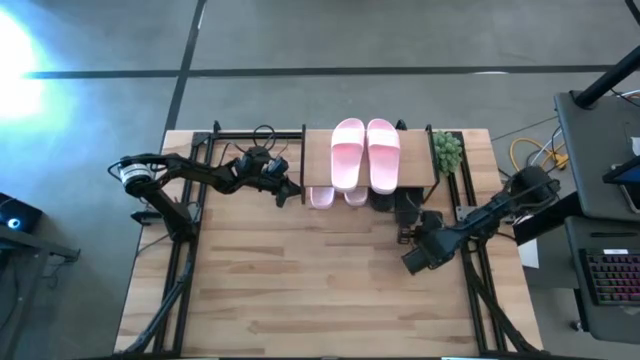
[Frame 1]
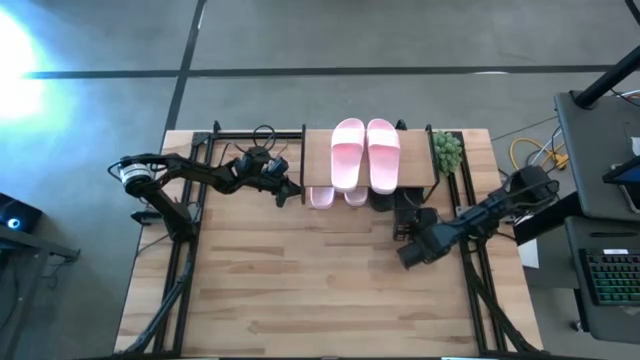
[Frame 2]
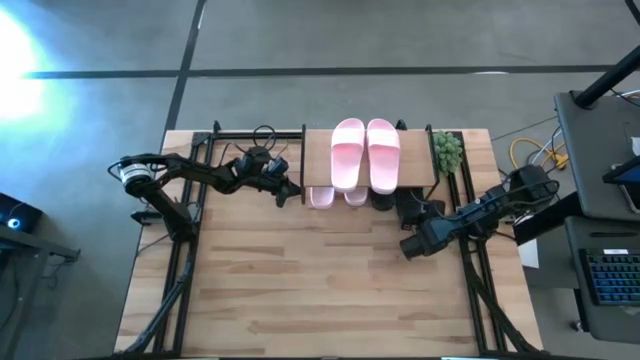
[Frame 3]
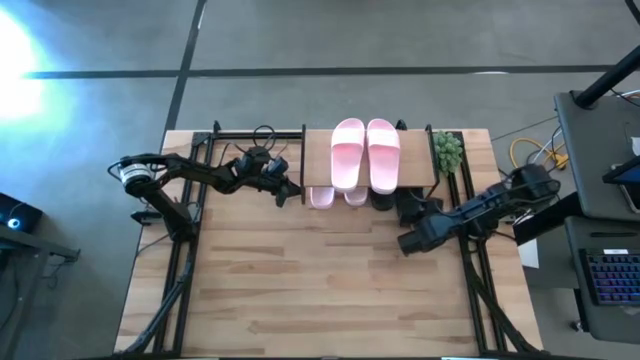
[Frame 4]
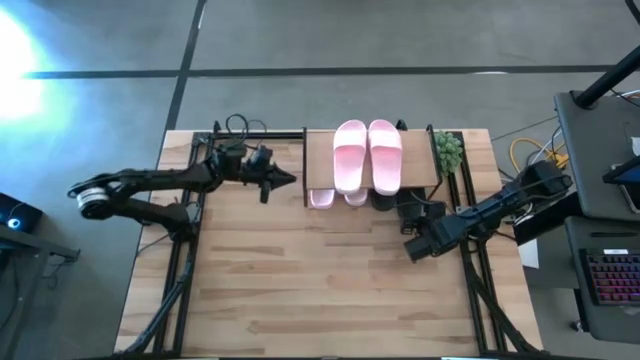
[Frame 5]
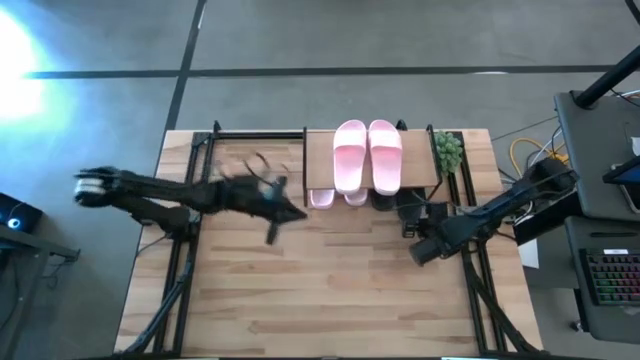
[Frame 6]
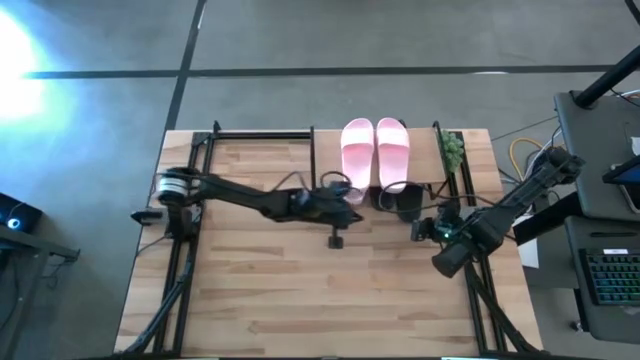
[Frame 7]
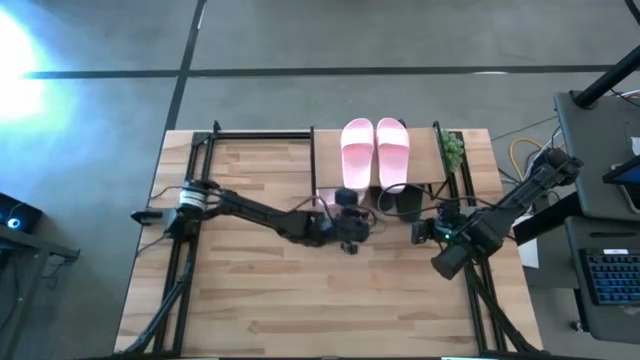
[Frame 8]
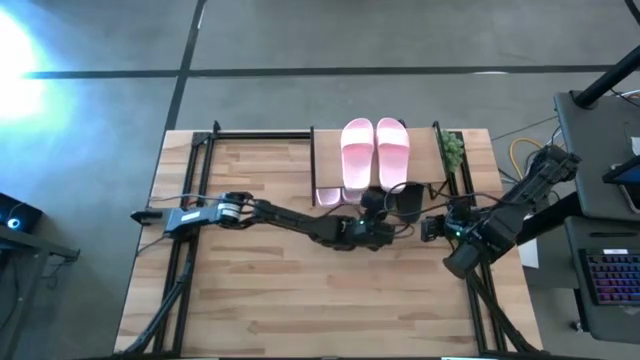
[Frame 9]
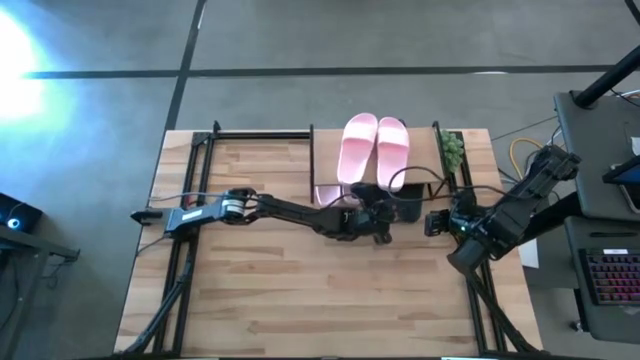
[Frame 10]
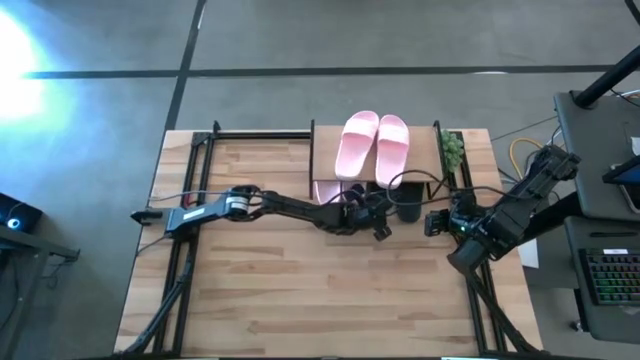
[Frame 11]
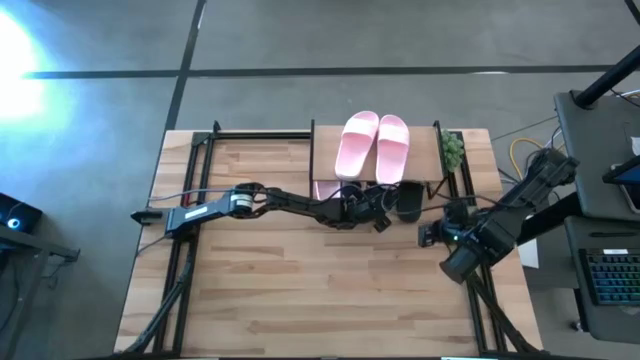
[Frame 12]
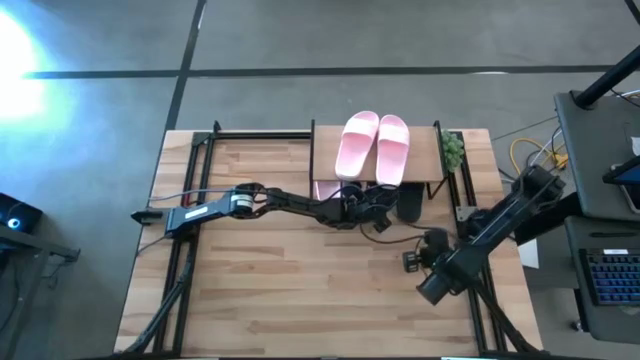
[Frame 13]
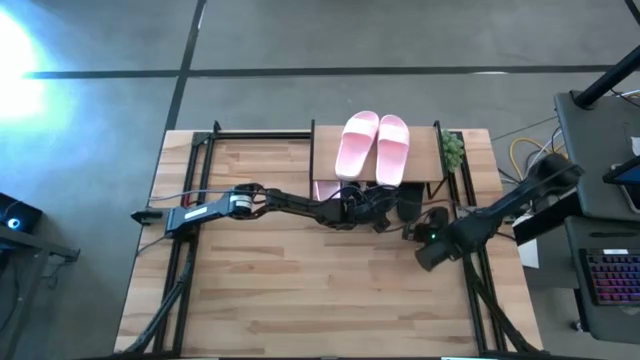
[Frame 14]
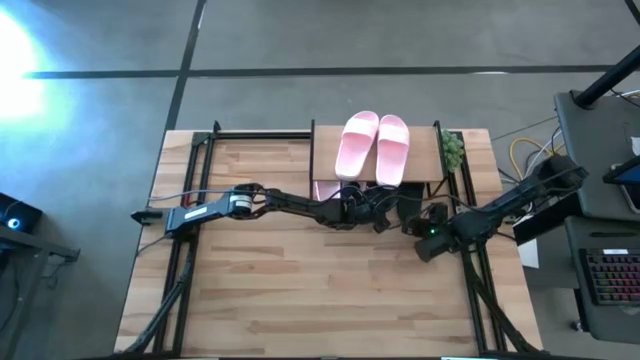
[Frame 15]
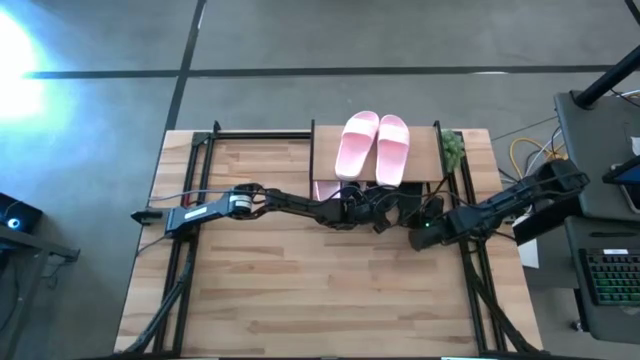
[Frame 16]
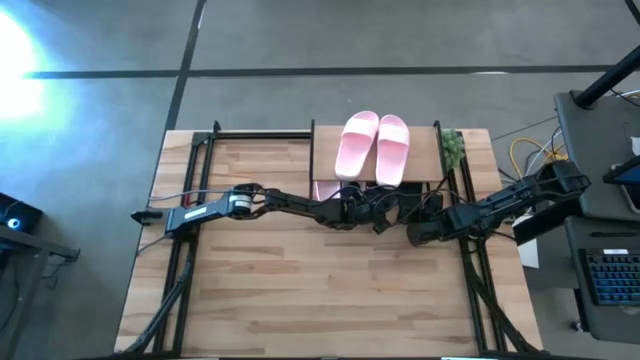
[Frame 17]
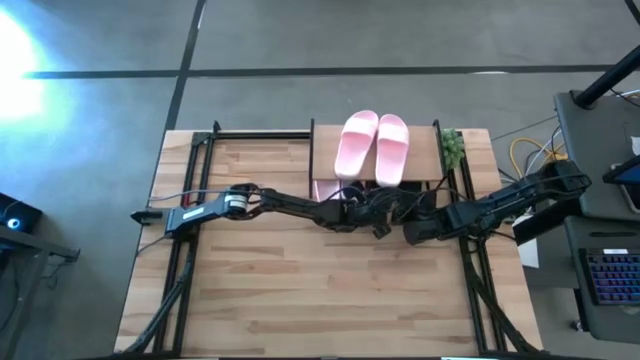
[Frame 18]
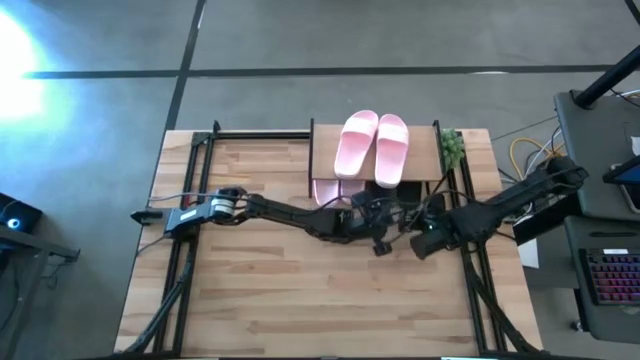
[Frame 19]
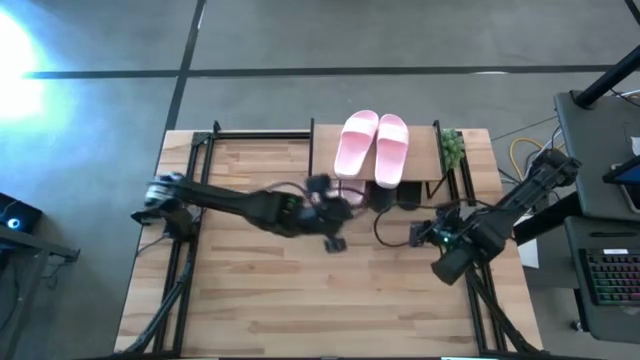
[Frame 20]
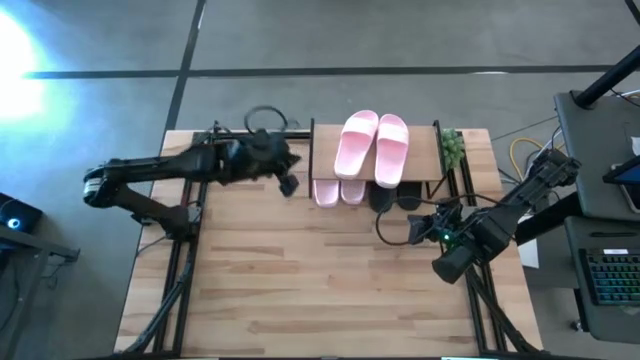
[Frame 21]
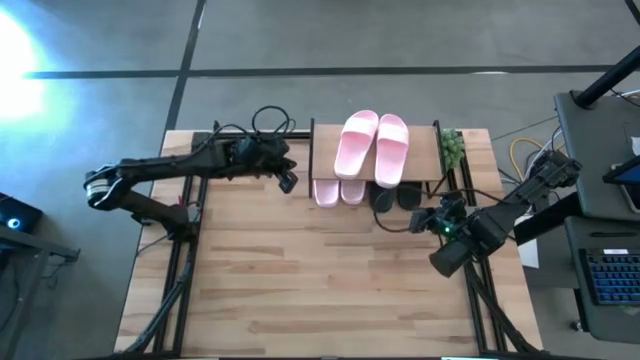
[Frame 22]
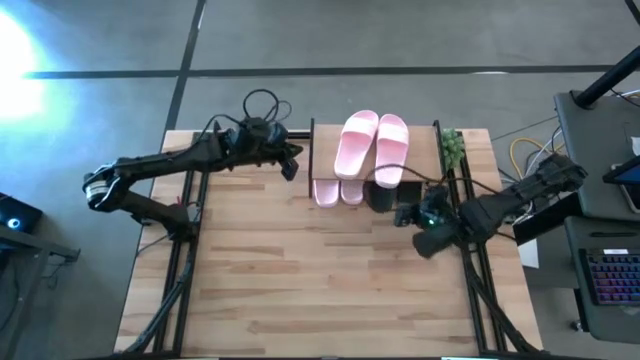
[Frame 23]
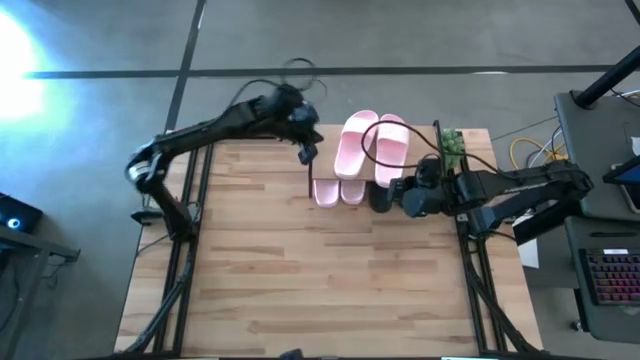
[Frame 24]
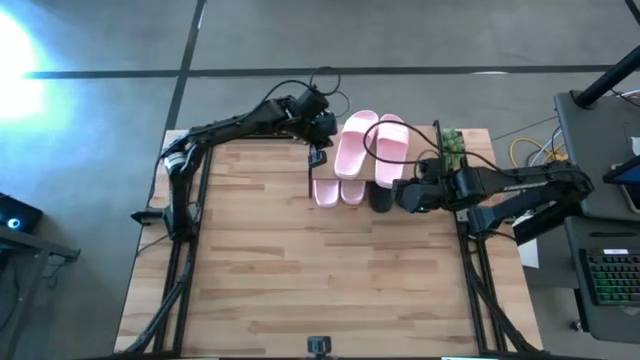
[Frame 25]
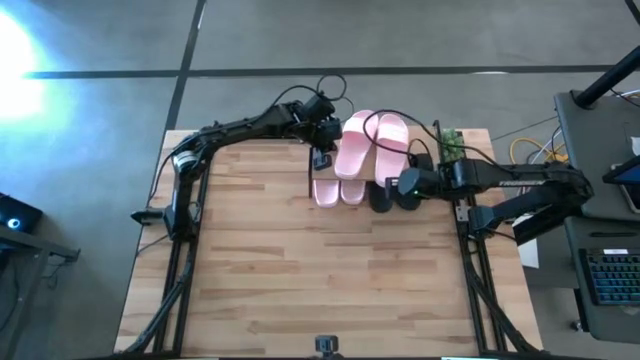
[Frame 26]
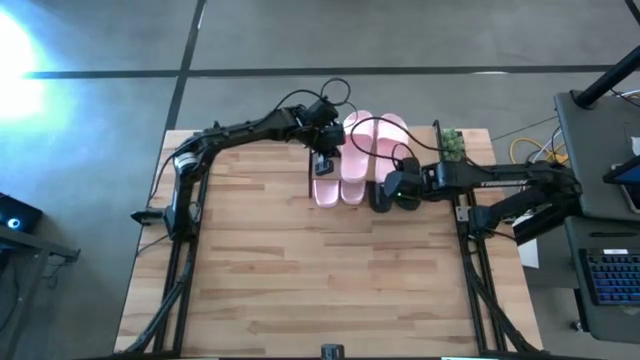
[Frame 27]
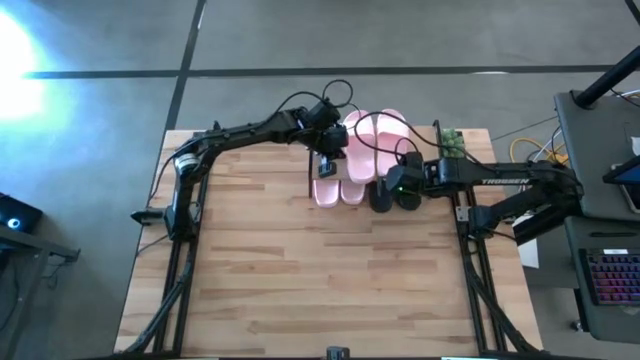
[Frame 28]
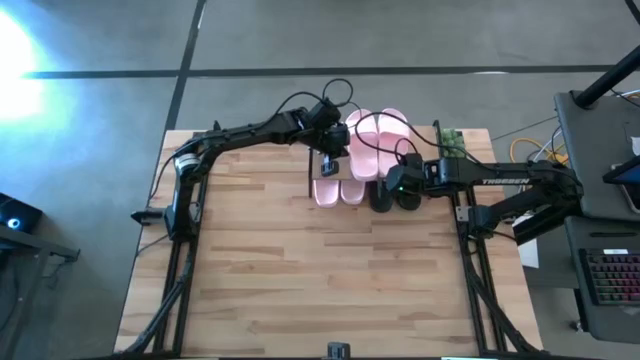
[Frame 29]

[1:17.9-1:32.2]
Task: Pick and place slides into the shelf
Adjust the pair of slippers

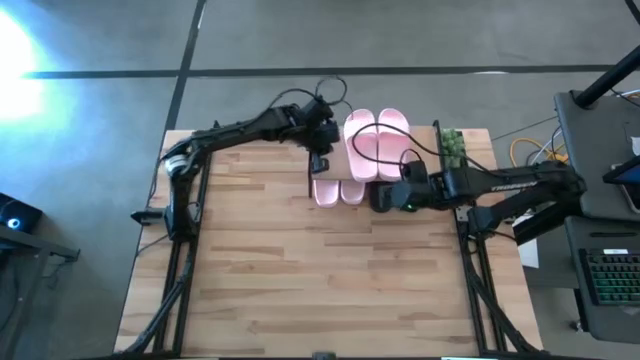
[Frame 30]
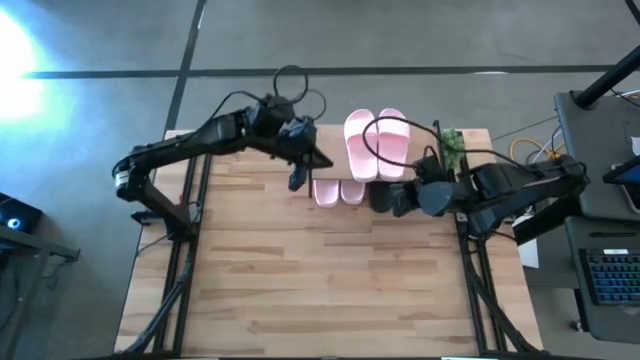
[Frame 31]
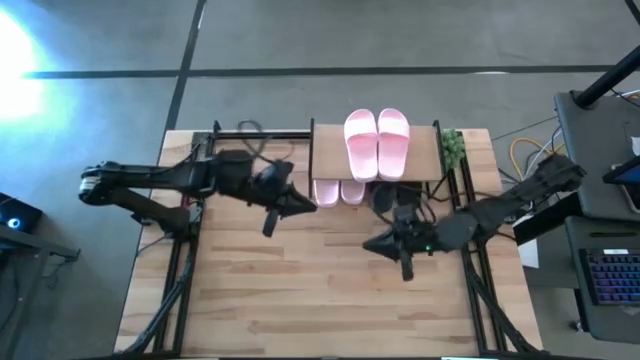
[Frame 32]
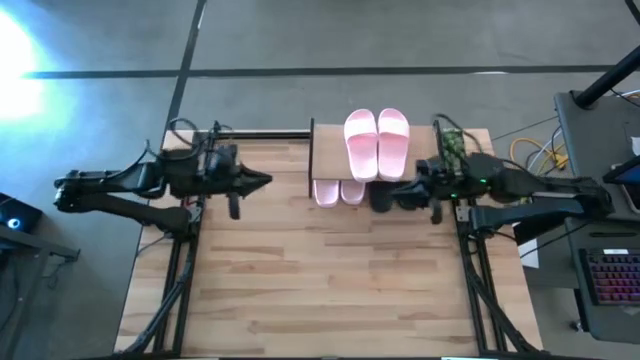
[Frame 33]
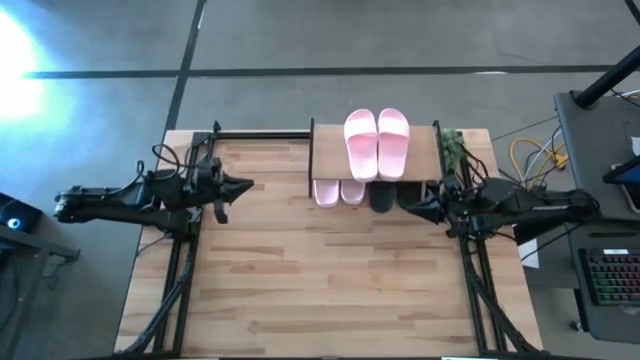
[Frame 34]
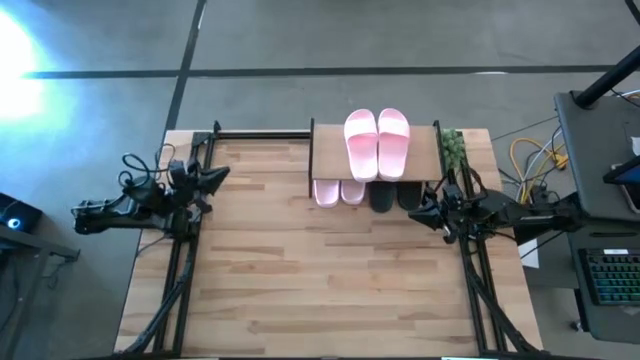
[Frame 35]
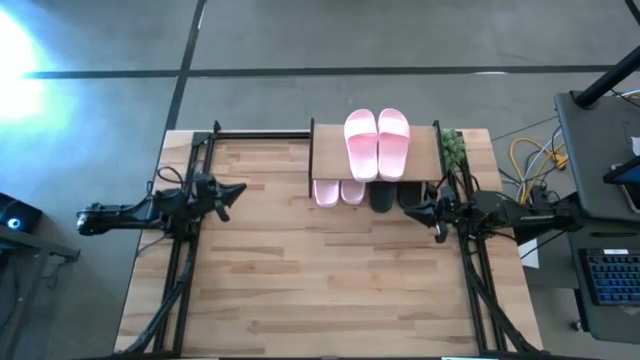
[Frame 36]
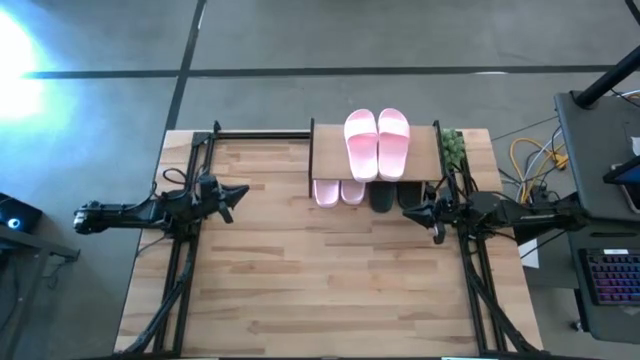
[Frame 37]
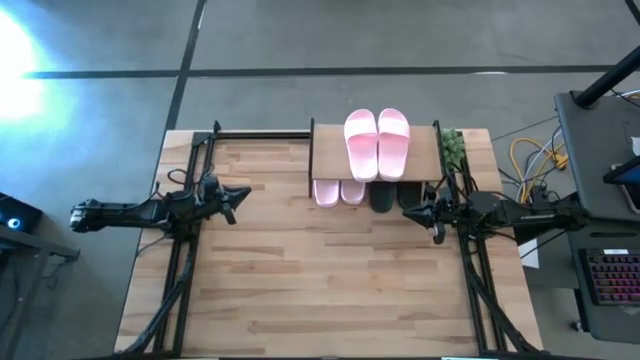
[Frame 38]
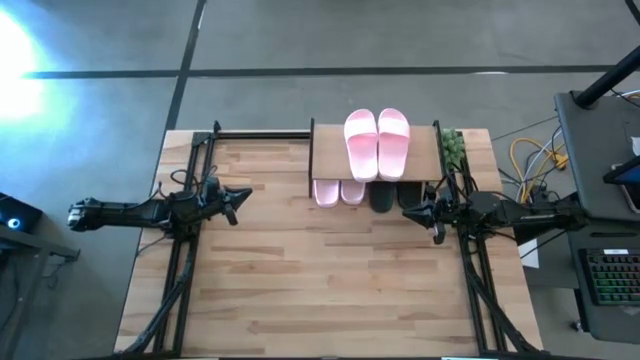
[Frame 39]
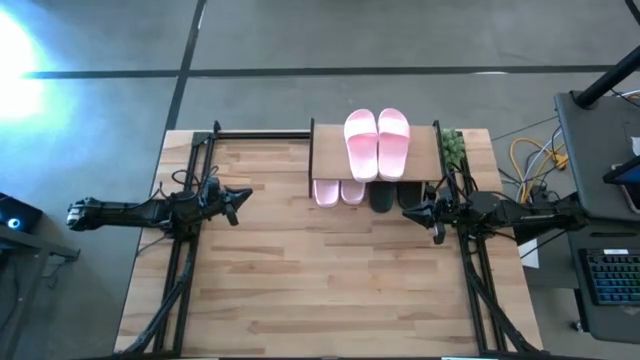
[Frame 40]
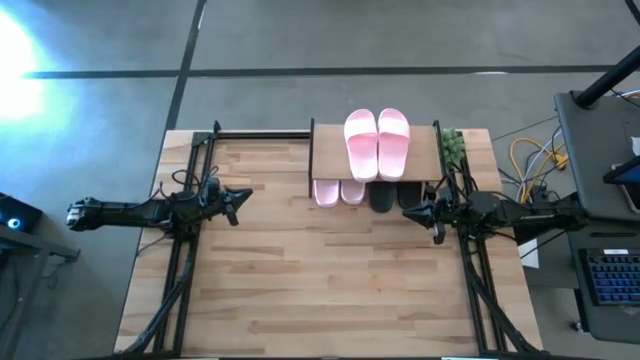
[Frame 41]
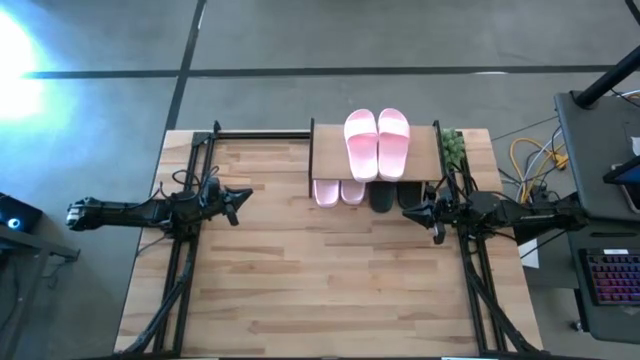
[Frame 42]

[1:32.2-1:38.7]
Return to Home Position

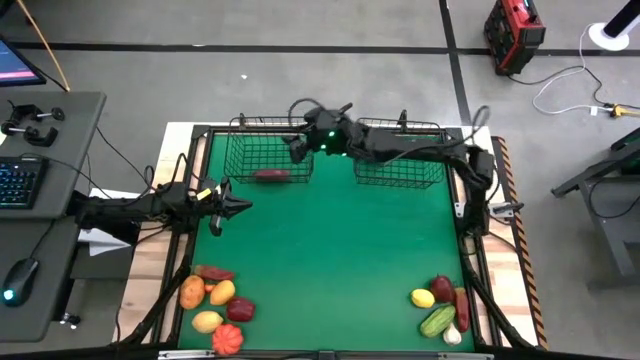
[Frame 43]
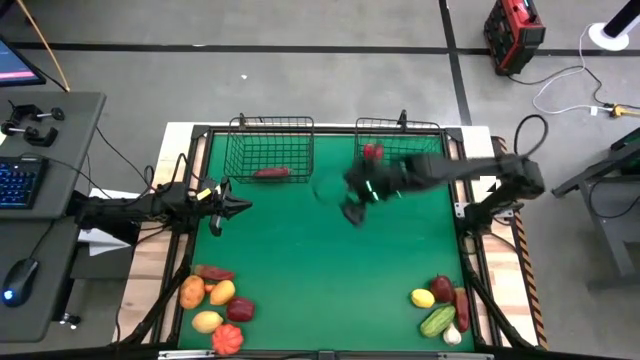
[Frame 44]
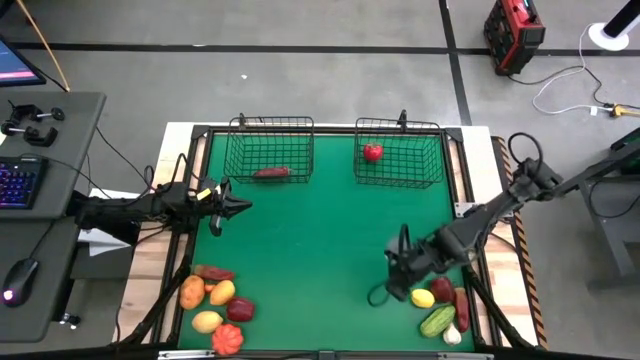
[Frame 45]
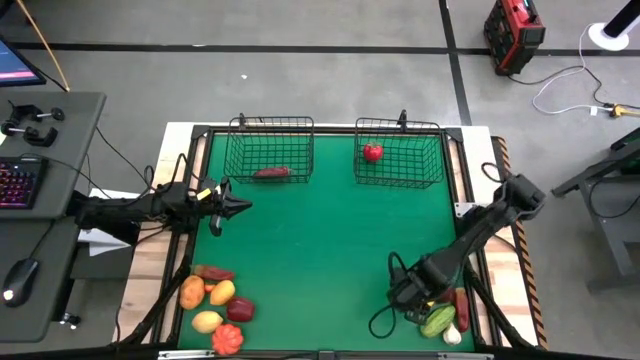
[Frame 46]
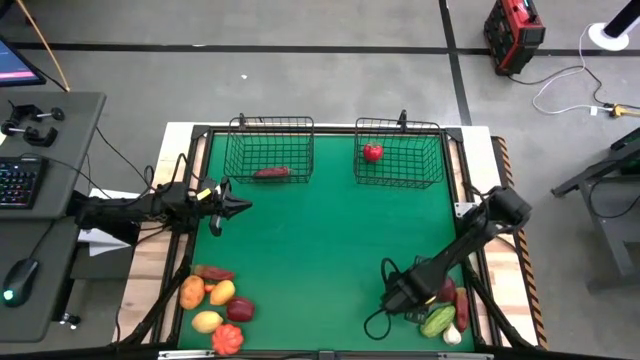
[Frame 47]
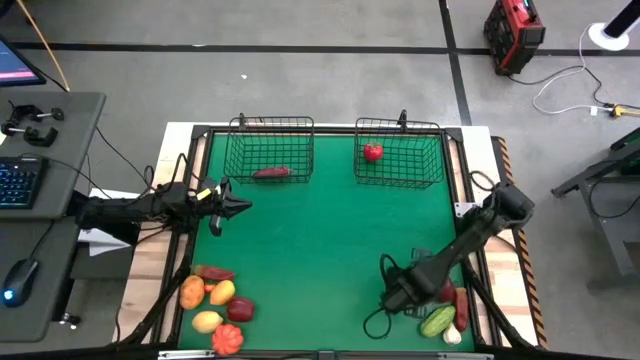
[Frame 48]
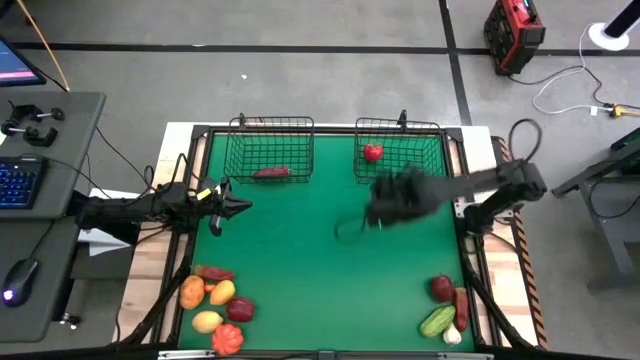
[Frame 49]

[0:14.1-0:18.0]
Task: Sort produce into baskets
Put the right yellow lemon into the right wire basket
